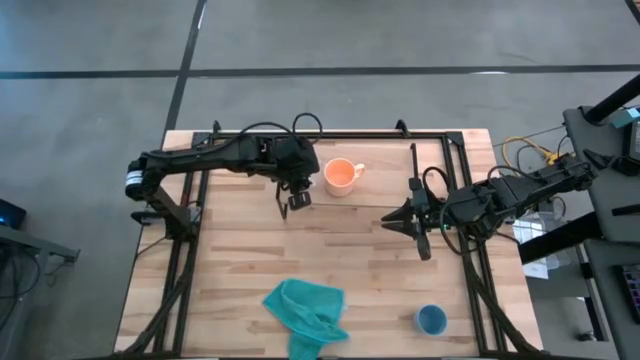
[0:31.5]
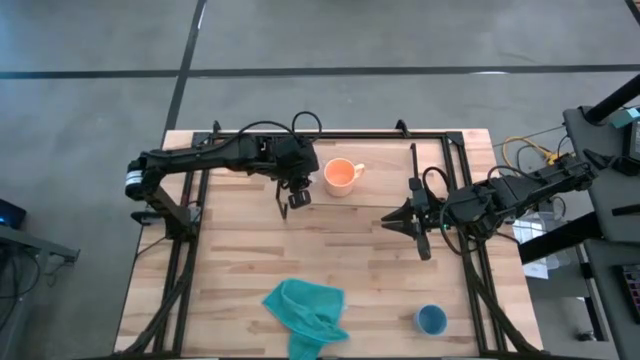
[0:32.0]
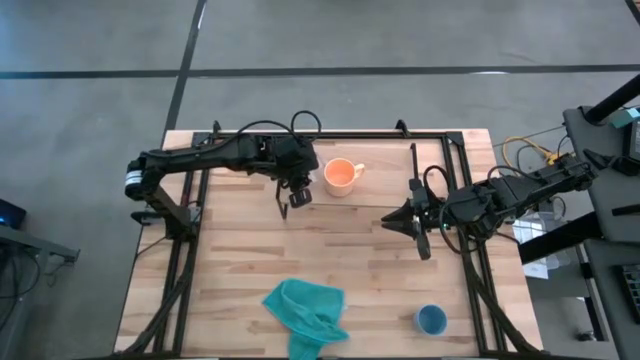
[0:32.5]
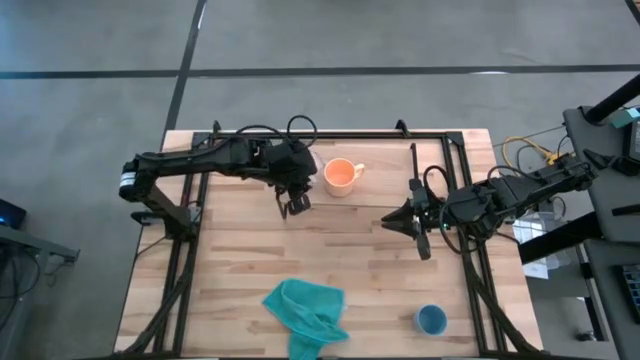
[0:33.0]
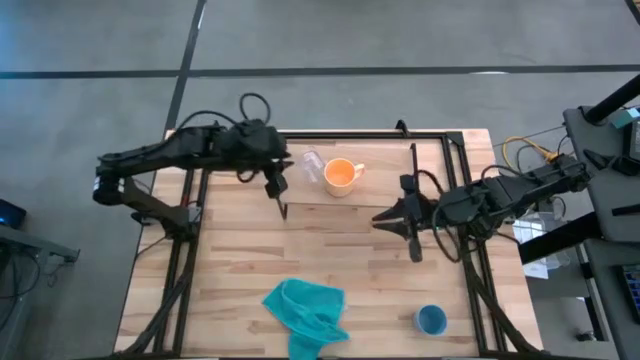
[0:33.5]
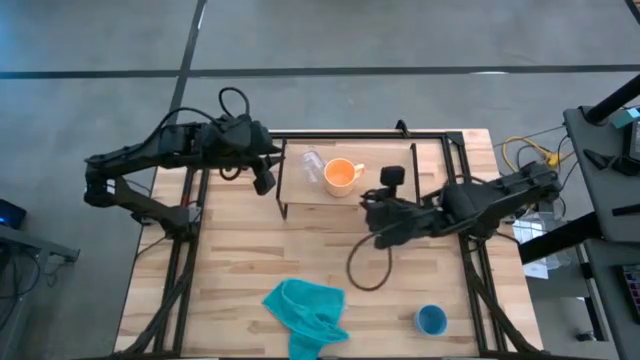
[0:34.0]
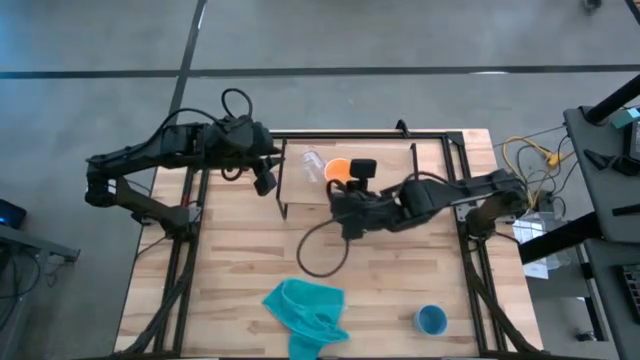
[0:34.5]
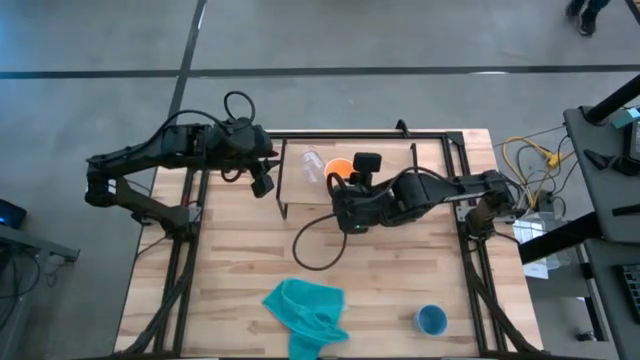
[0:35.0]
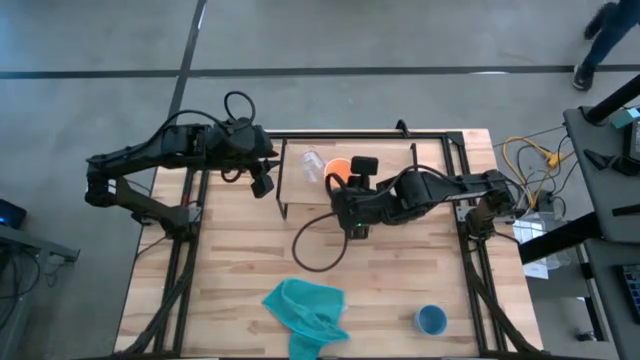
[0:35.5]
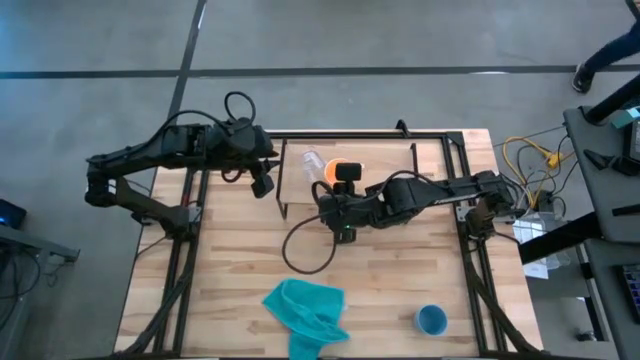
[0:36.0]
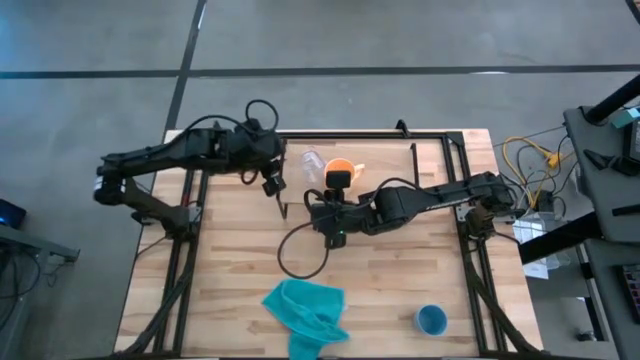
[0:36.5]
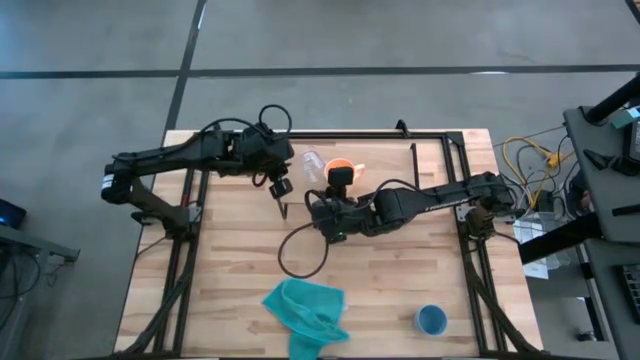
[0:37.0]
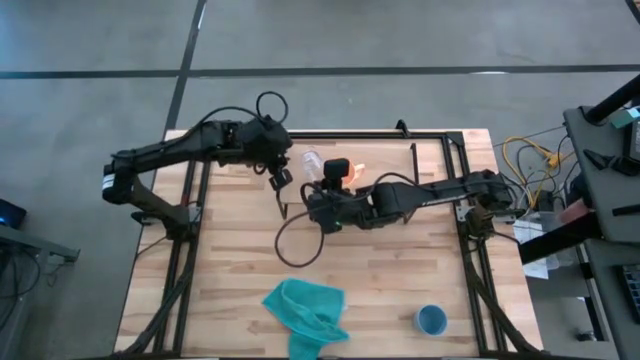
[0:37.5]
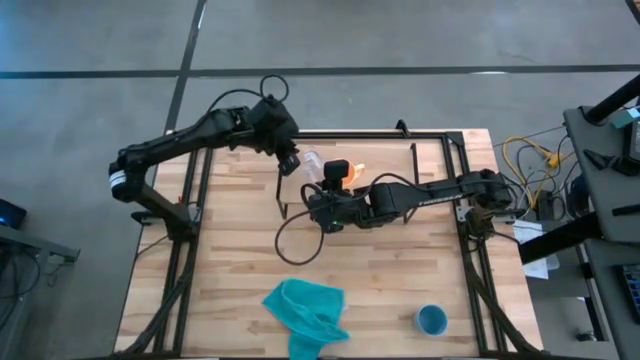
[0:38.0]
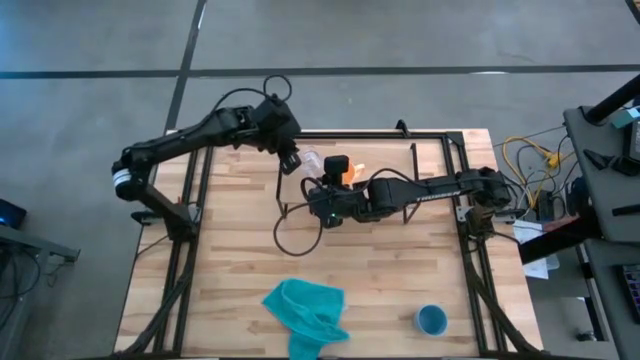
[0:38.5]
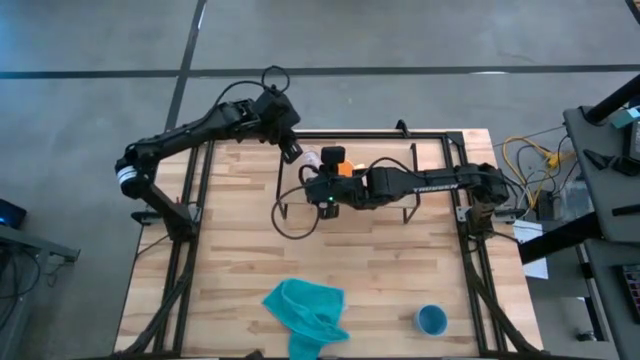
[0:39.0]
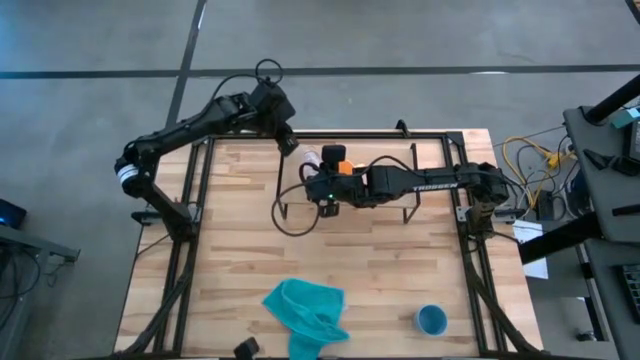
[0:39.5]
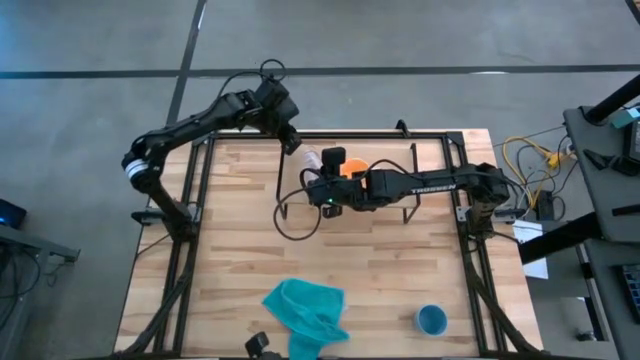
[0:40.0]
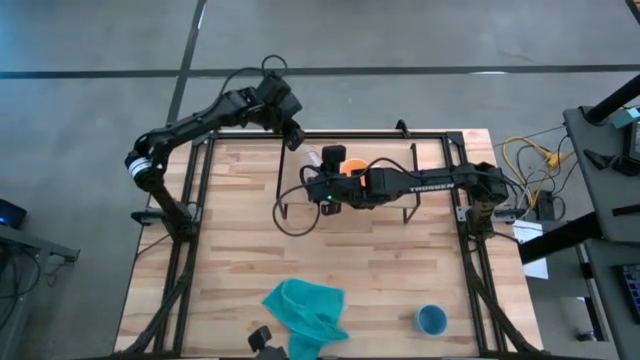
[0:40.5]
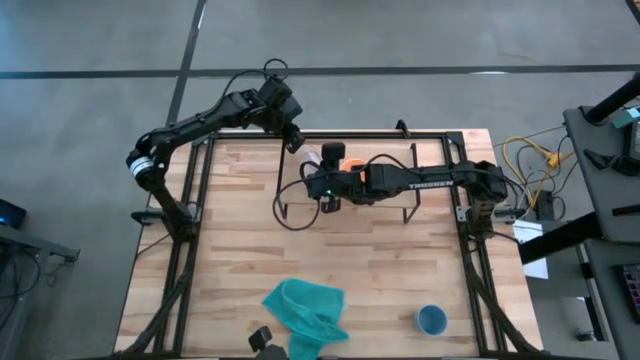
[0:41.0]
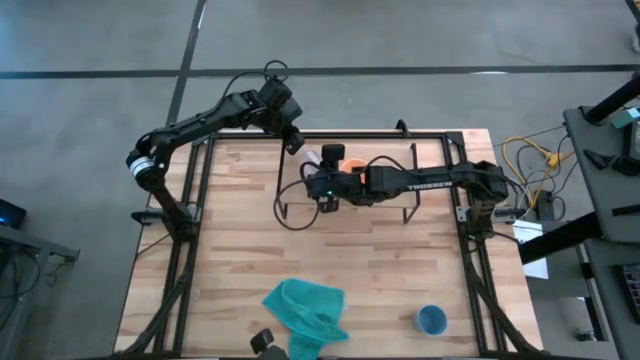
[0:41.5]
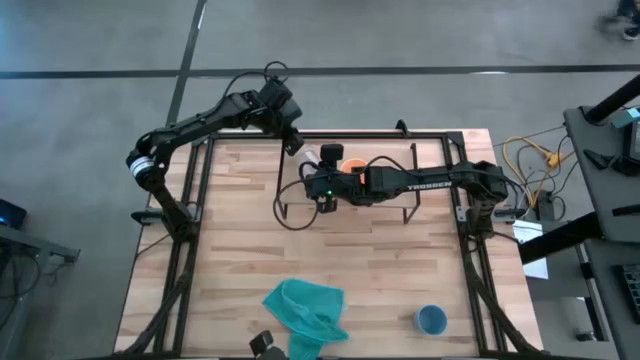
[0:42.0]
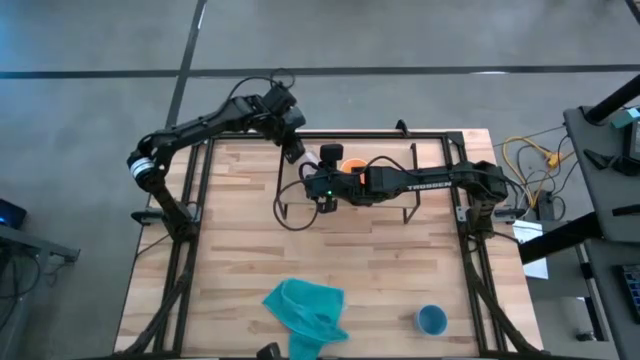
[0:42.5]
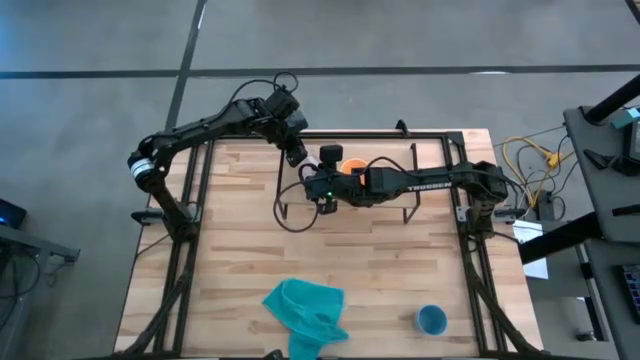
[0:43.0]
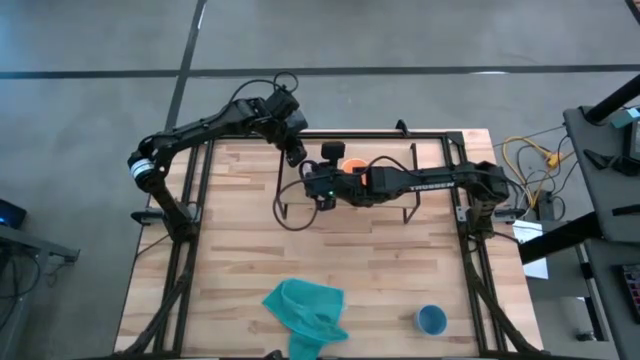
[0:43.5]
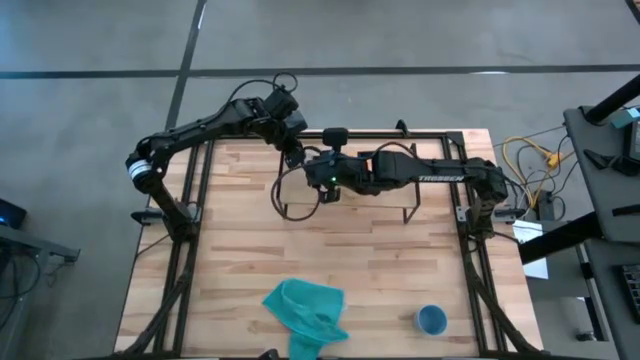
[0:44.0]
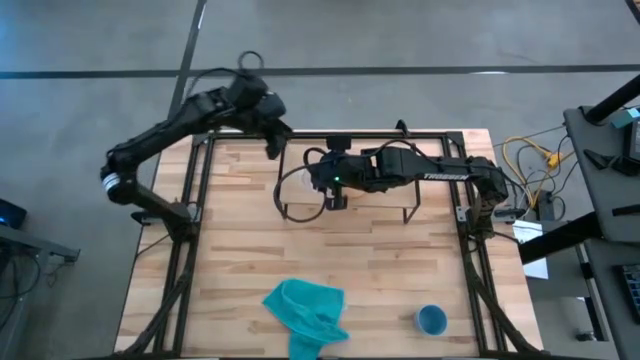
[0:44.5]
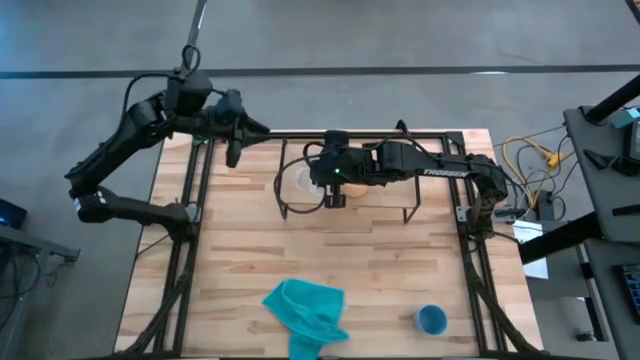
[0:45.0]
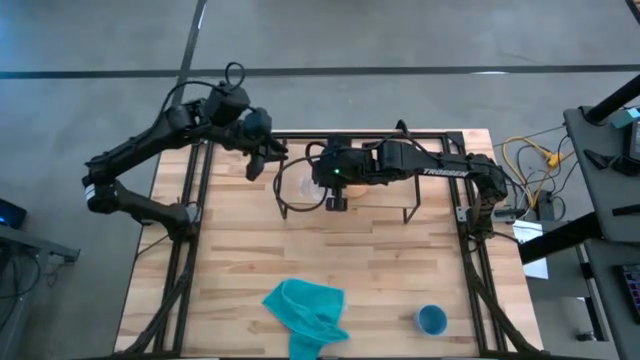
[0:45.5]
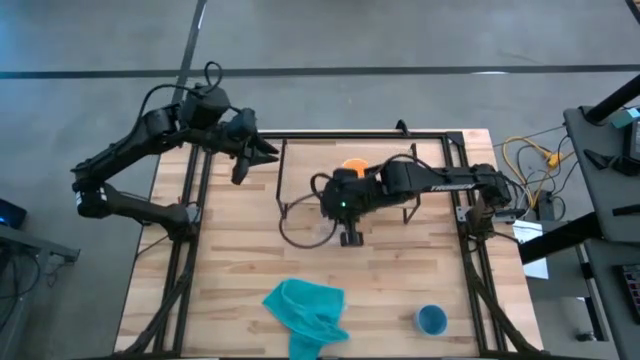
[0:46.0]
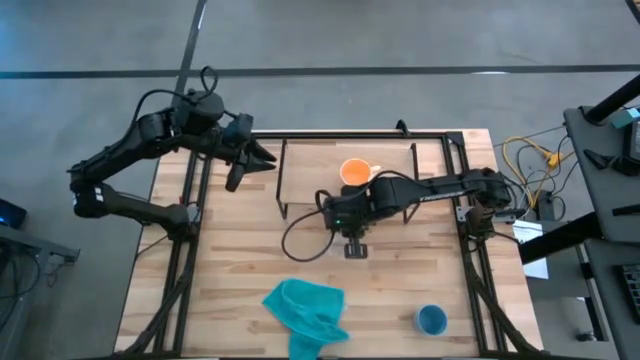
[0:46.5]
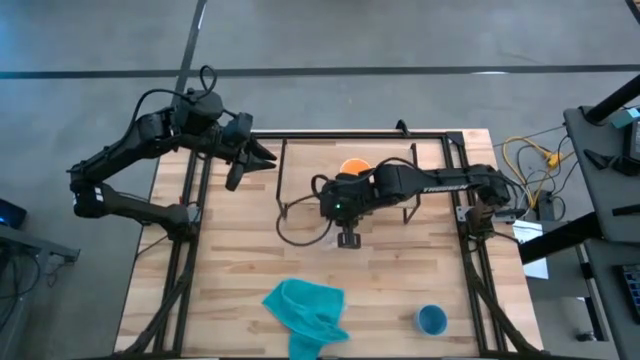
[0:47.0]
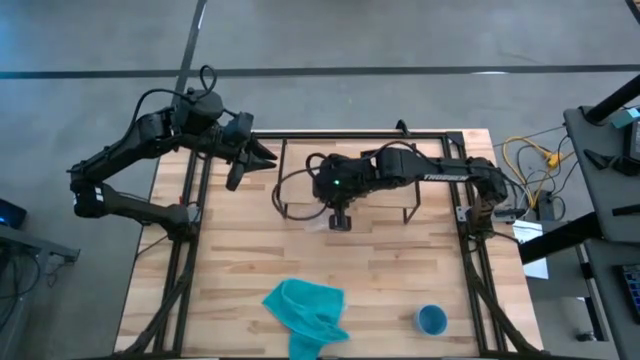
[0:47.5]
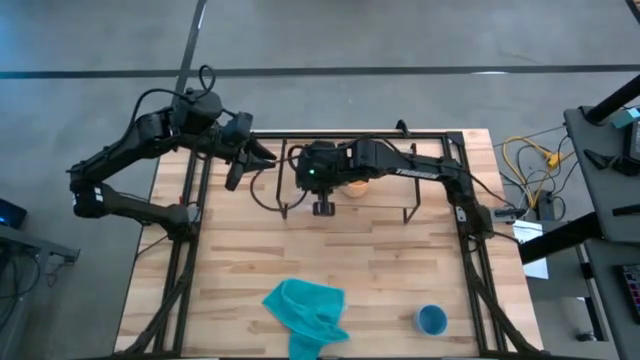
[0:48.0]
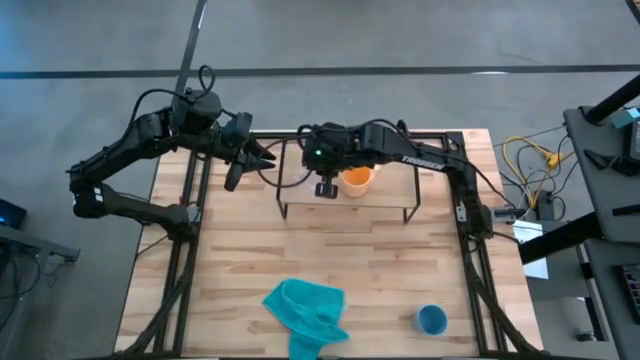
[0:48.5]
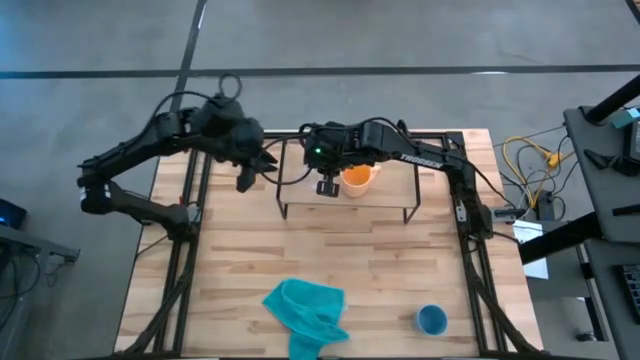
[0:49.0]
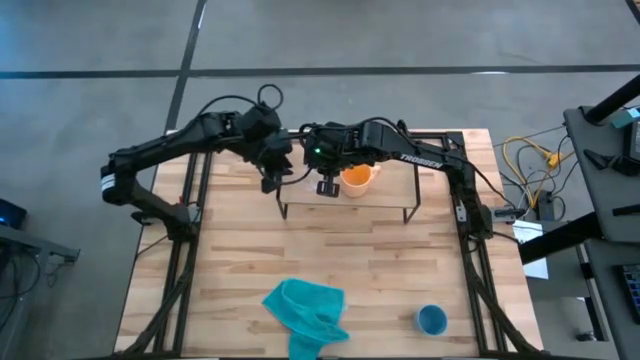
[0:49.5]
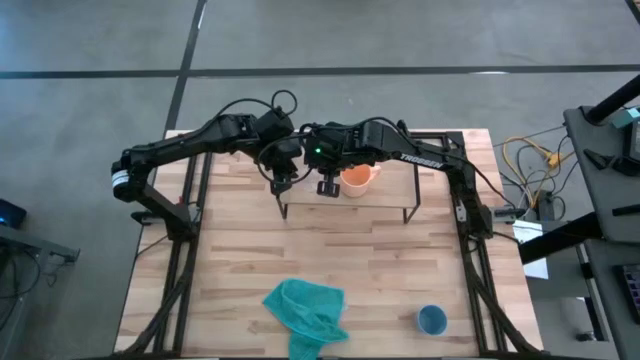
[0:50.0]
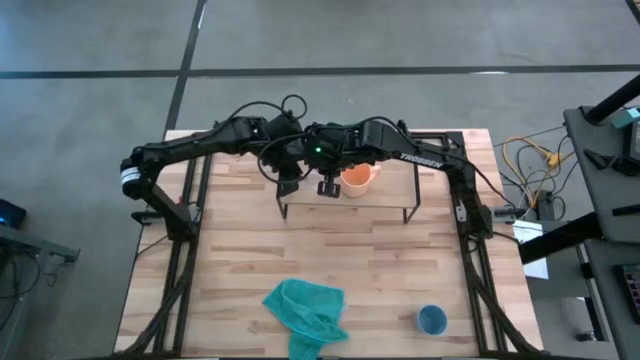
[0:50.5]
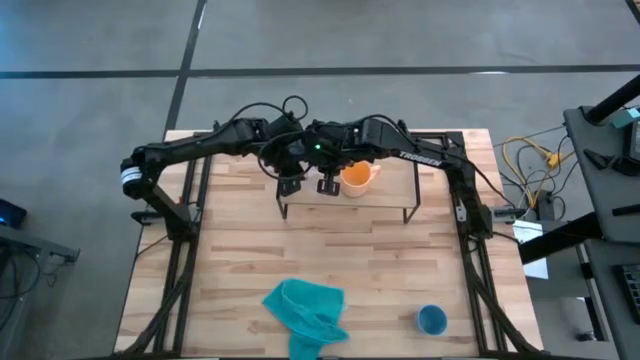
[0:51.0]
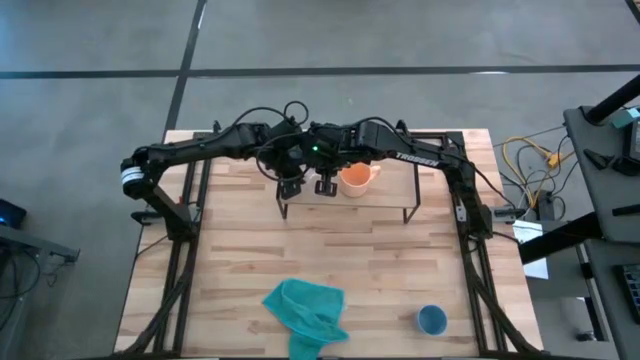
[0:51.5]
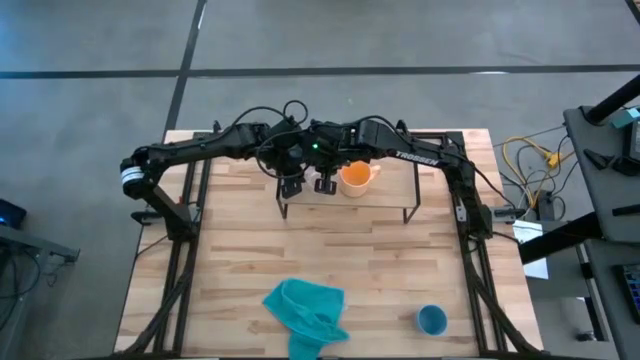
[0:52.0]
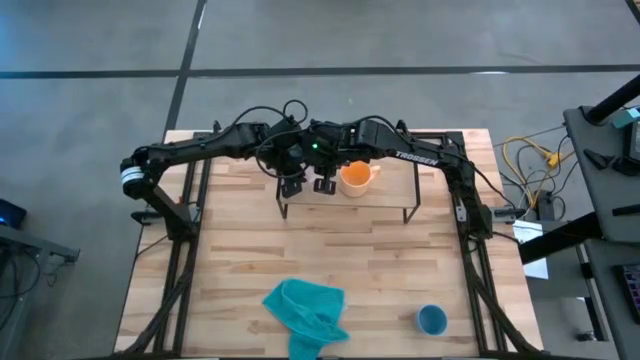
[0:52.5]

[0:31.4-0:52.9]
Task: Stack small to large cups/mugs on shelf
Put the transparent mug on the shelf
